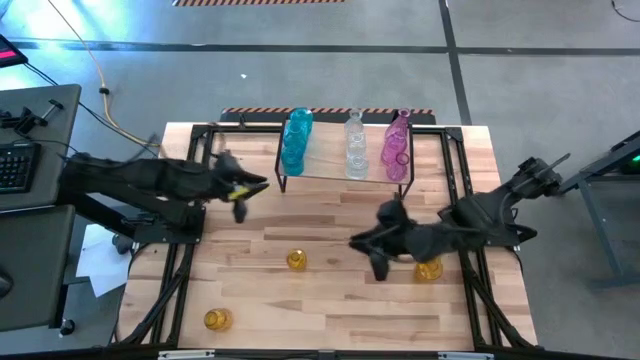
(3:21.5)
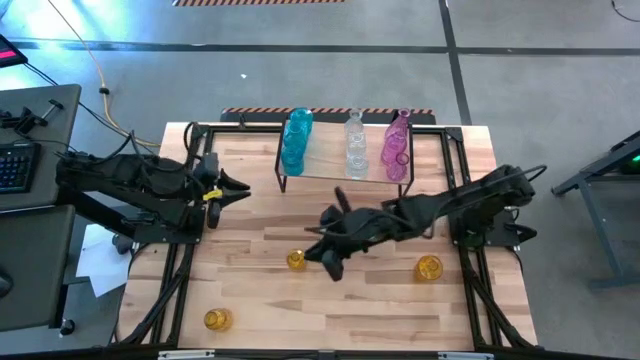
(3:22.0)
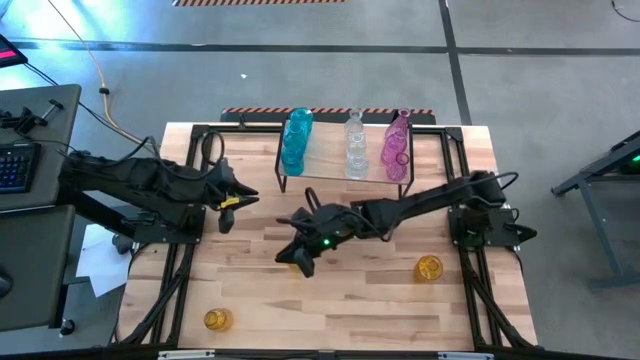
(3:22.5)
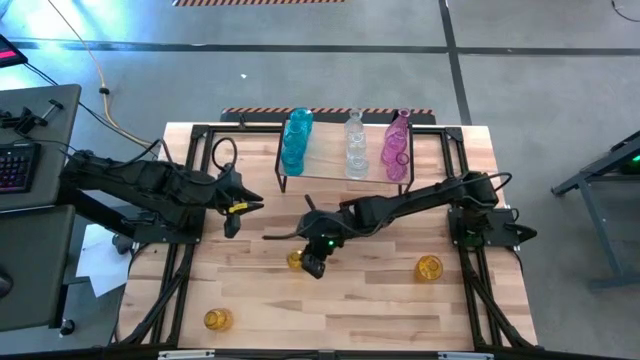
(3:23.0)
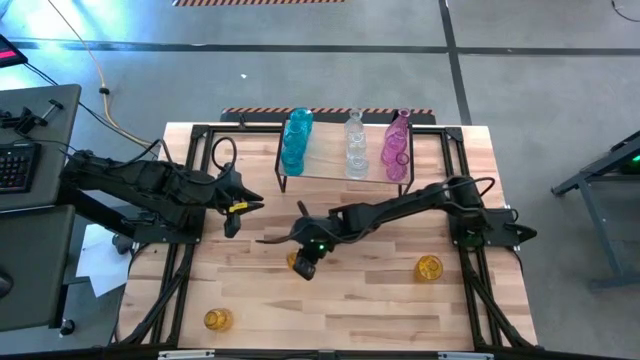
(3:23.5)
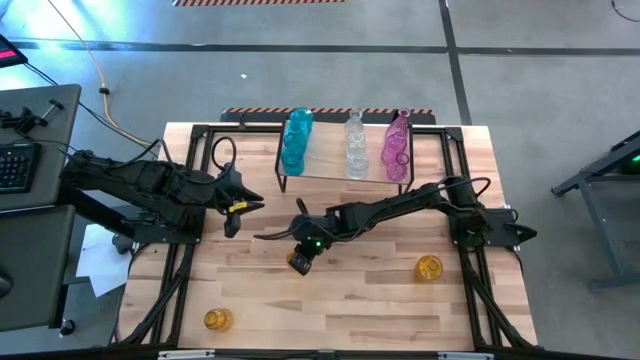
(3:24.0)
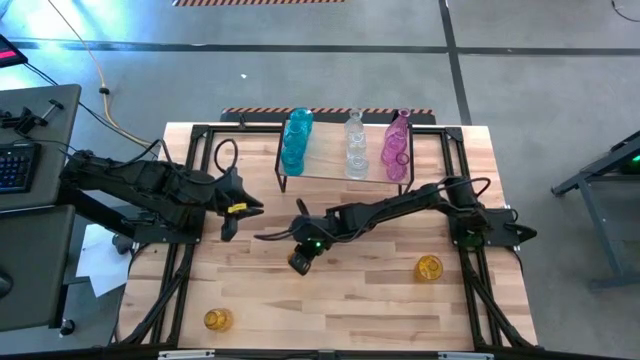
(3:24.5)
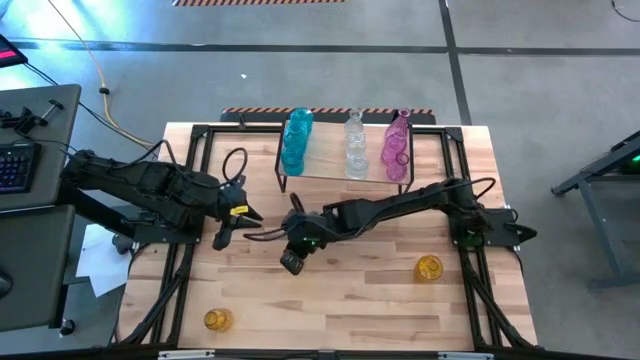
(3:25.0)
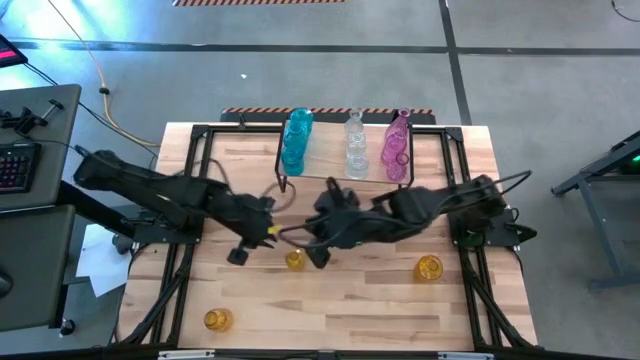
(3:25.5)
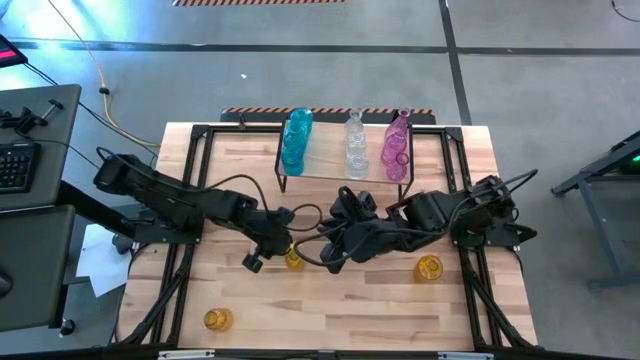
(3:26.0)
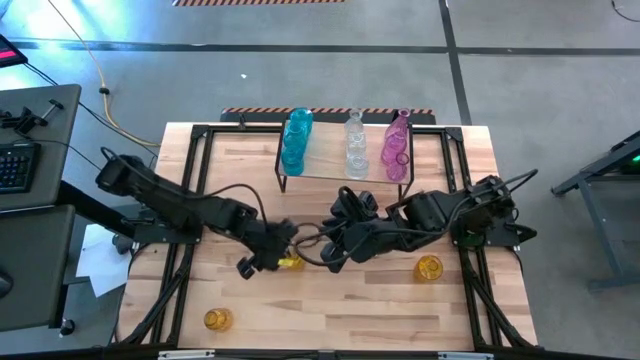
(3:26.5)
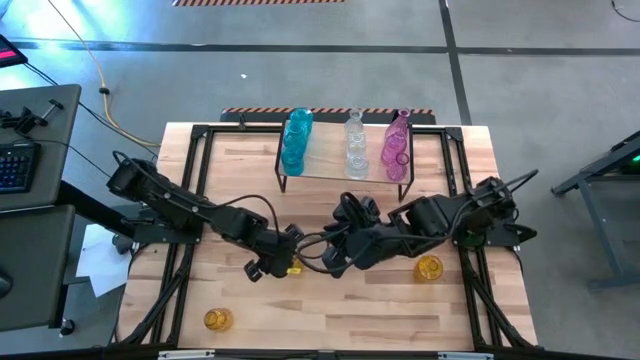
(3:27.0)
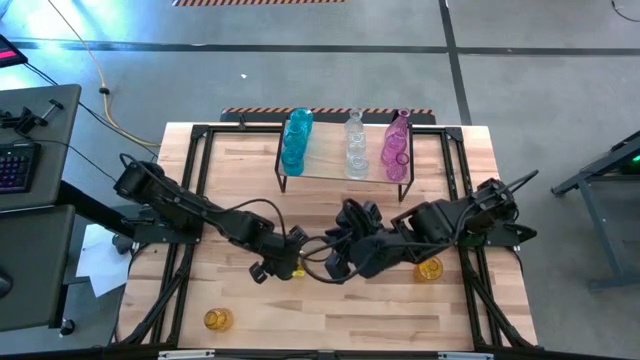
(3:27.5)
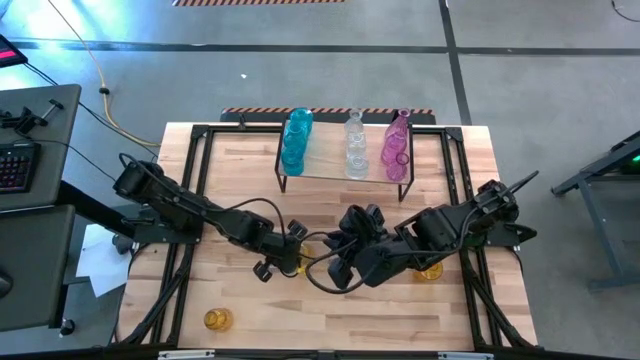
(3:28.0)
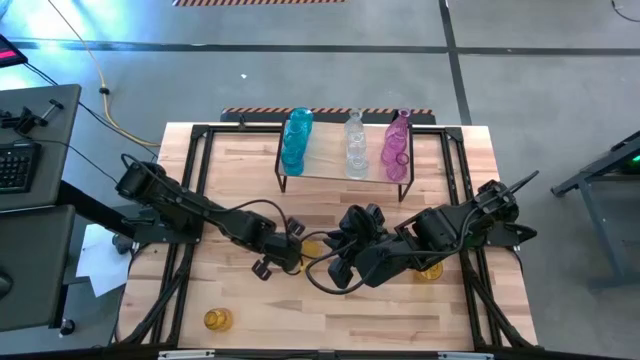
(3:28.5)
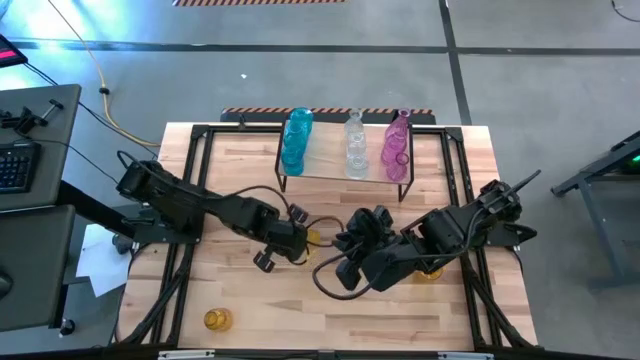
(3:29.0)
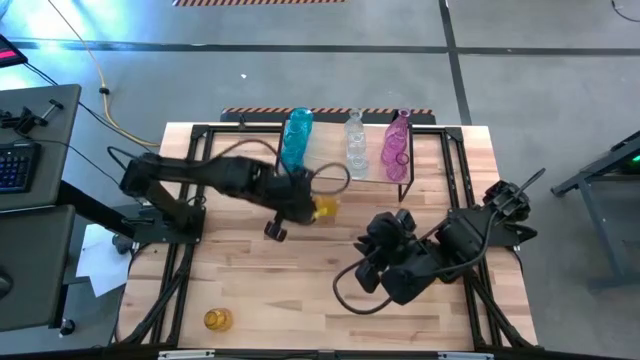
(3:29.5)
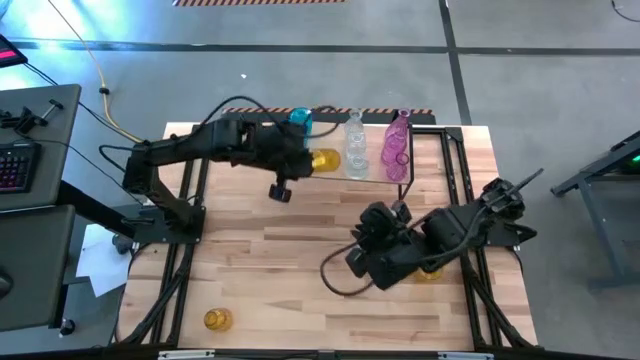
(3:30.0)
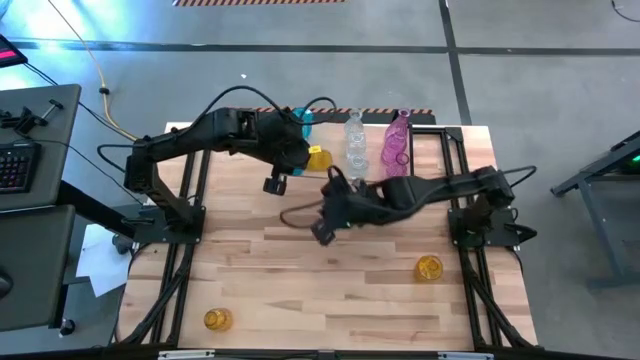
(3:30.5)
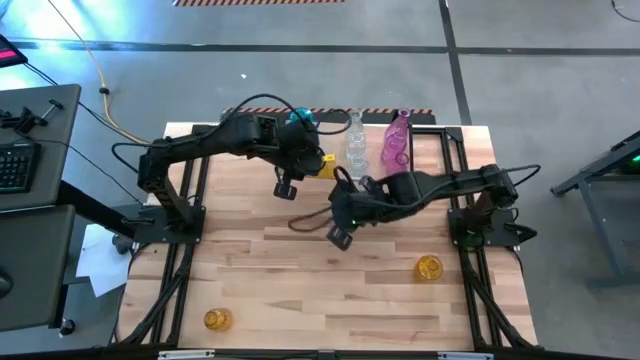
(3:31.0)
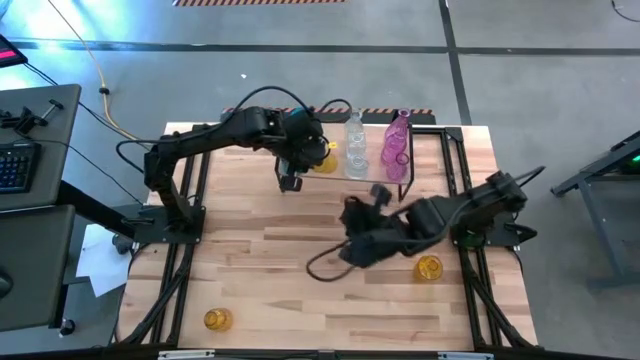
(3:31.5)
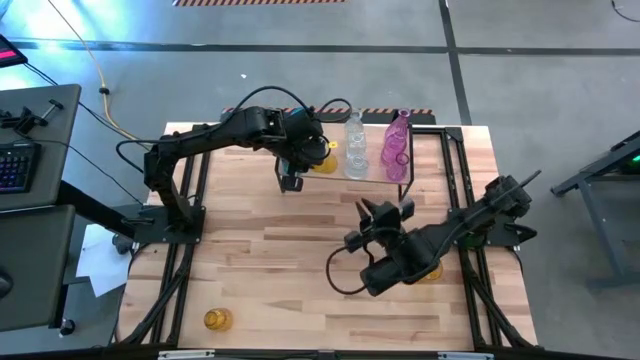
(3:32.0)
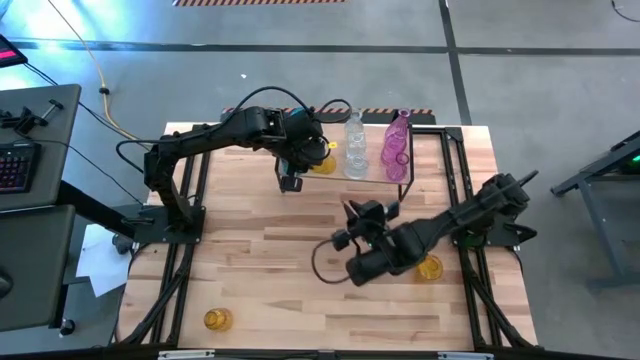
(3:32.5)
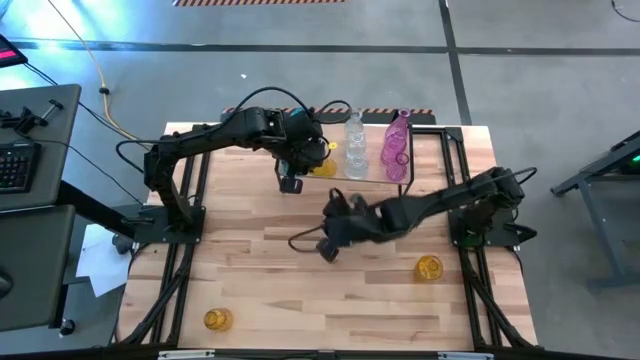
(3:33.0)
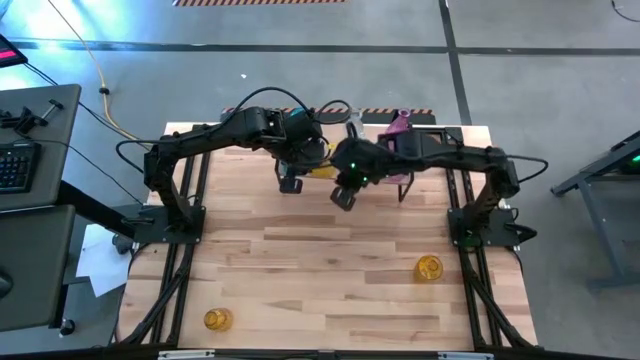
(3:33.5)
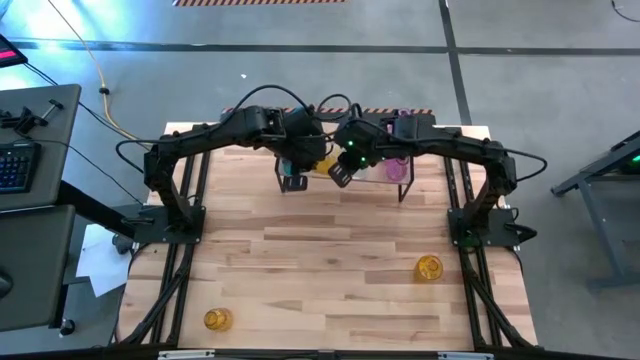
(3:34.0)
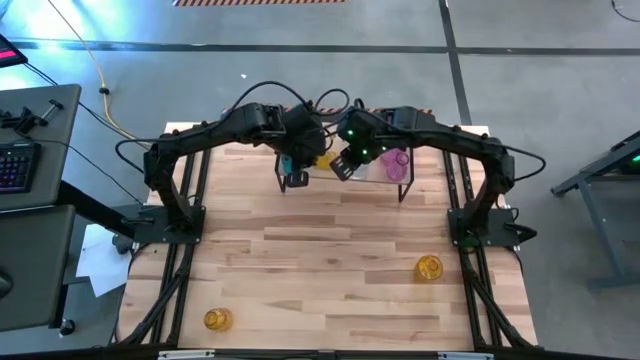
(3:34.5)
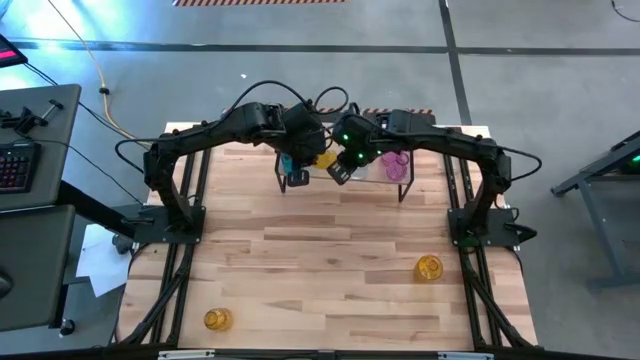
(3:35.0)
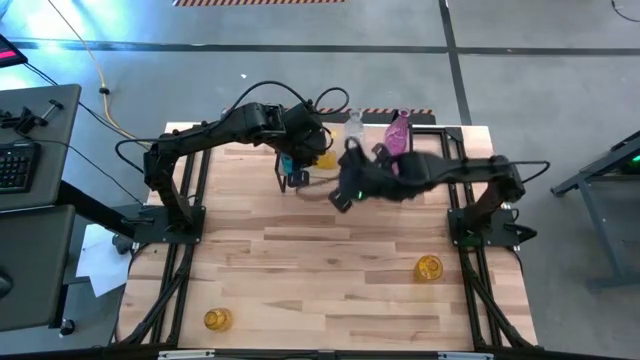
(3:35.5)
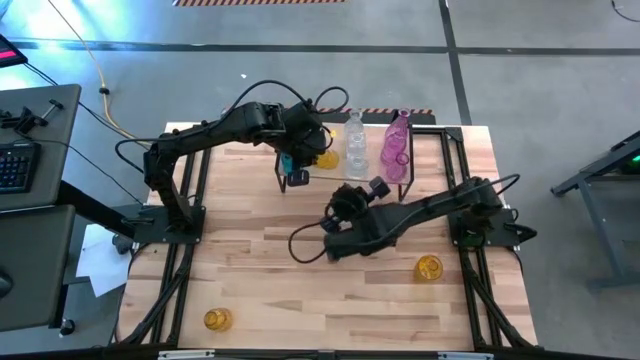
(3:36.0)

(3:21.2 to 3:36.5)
Task: sort vases onto shelf
Put the top left yellow vase on the shelf

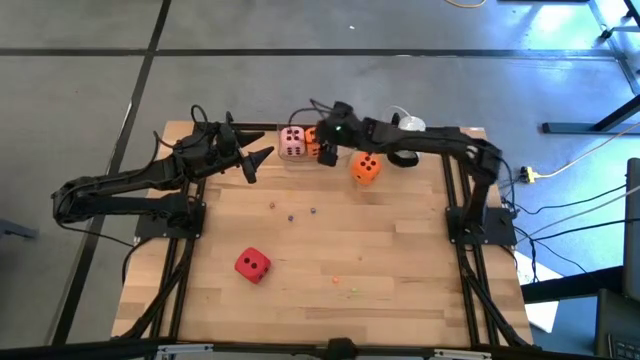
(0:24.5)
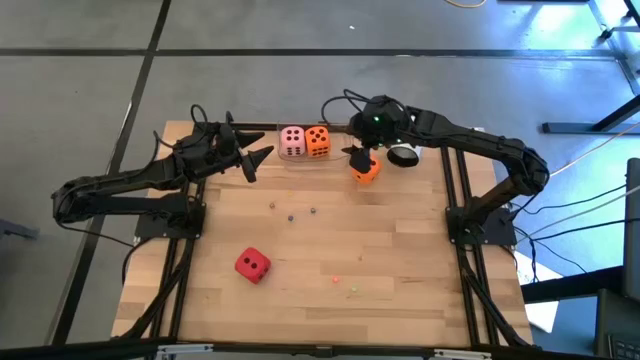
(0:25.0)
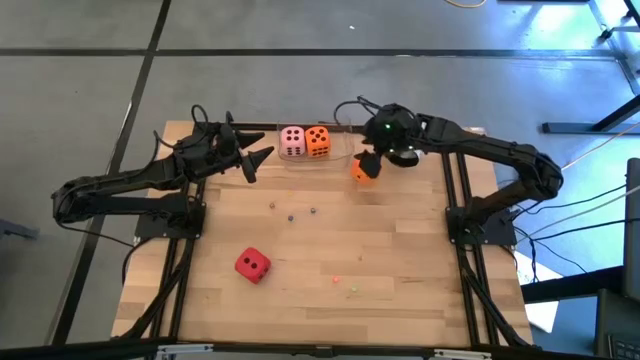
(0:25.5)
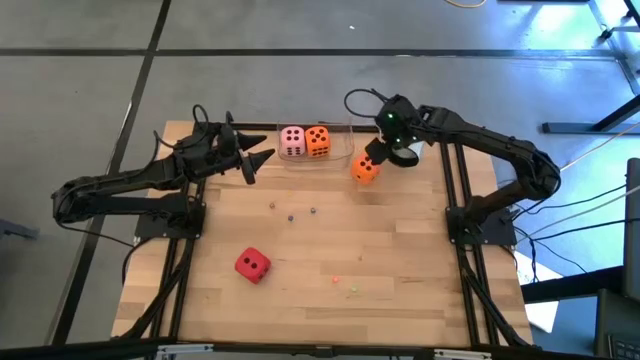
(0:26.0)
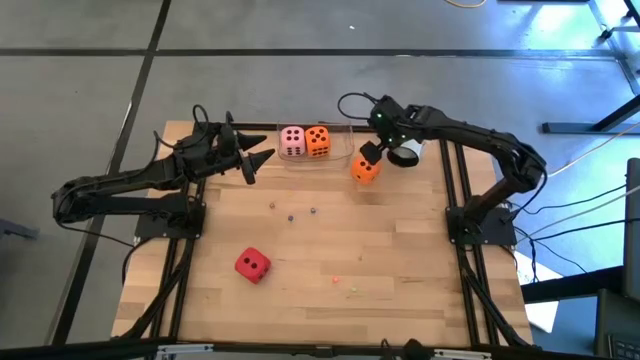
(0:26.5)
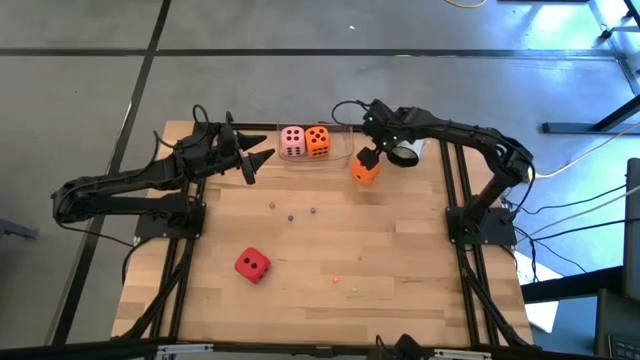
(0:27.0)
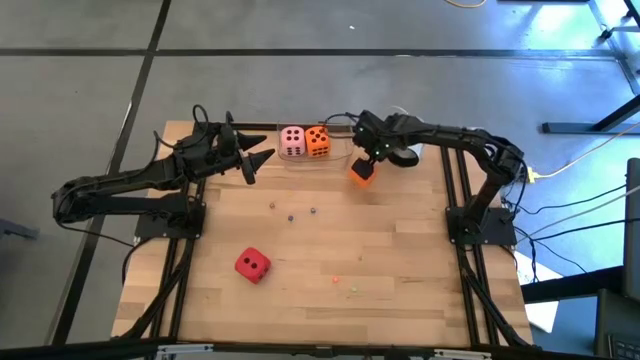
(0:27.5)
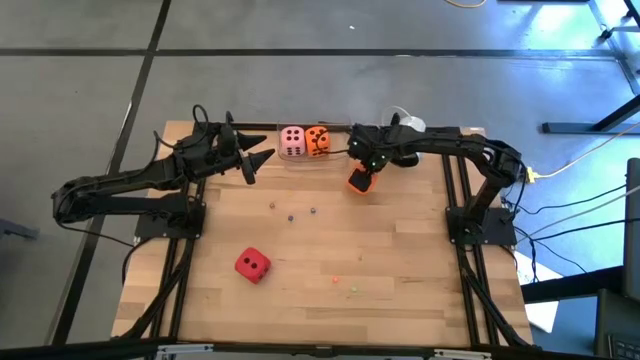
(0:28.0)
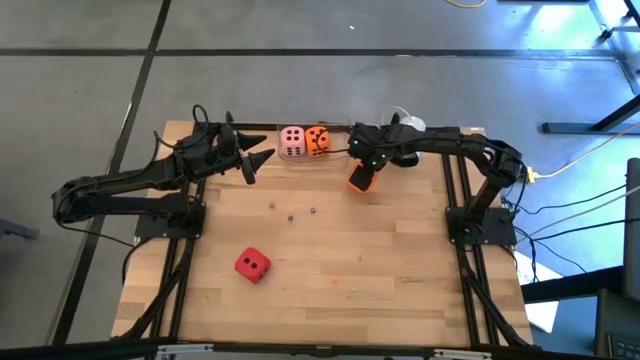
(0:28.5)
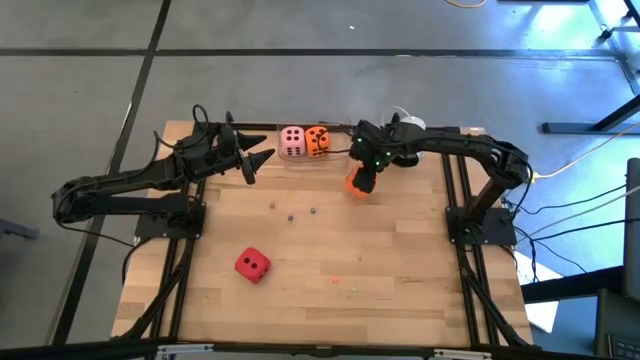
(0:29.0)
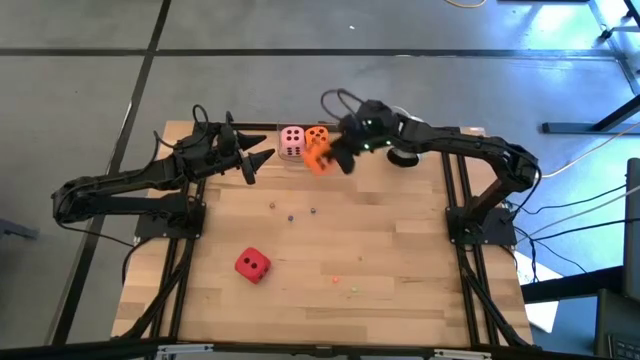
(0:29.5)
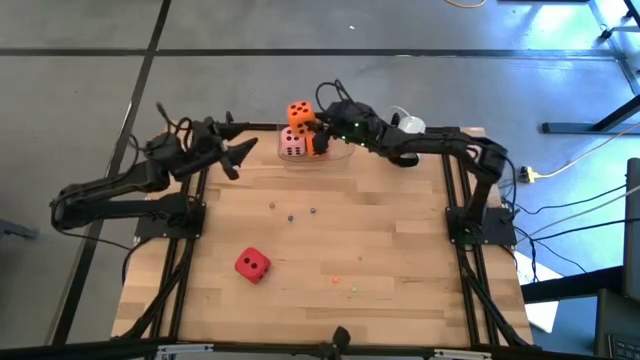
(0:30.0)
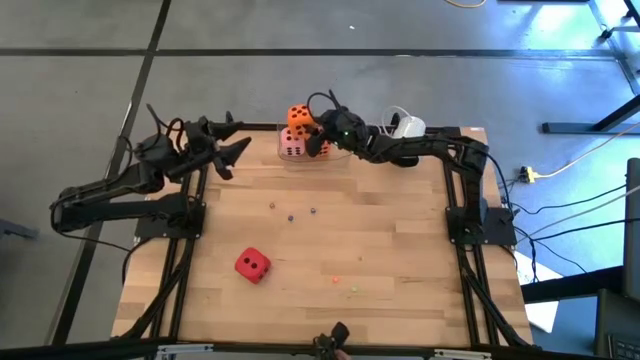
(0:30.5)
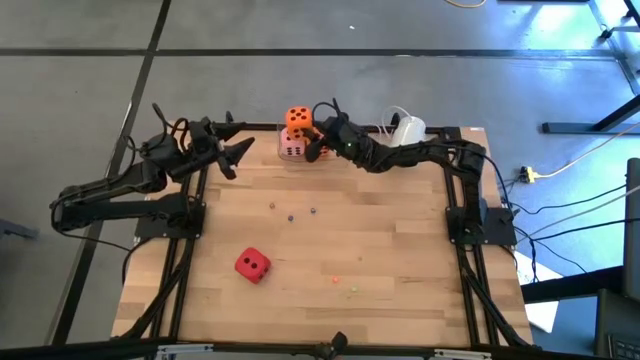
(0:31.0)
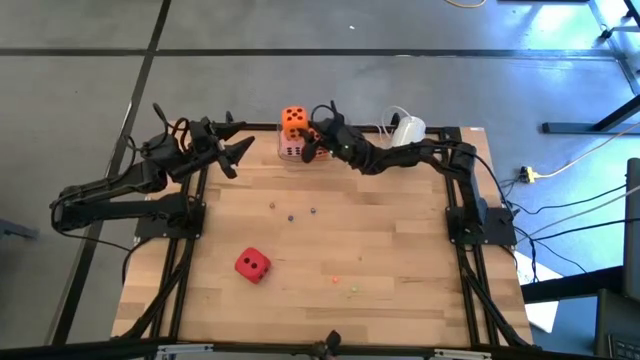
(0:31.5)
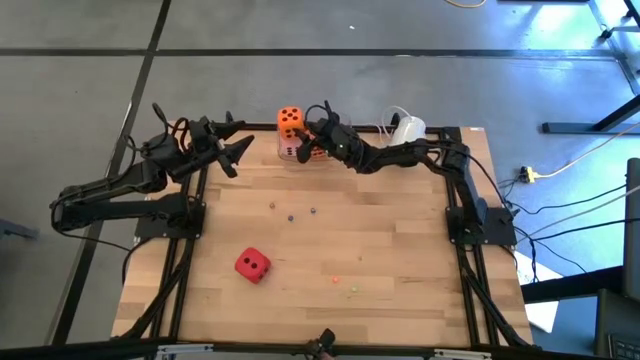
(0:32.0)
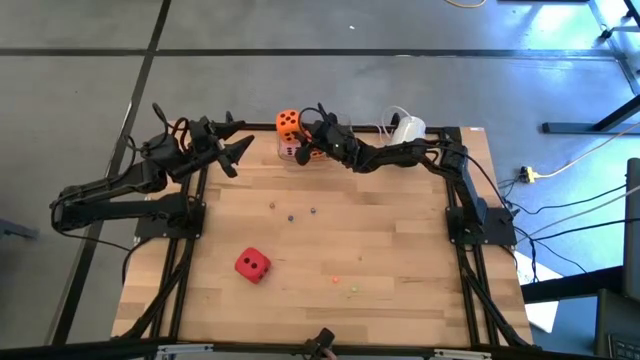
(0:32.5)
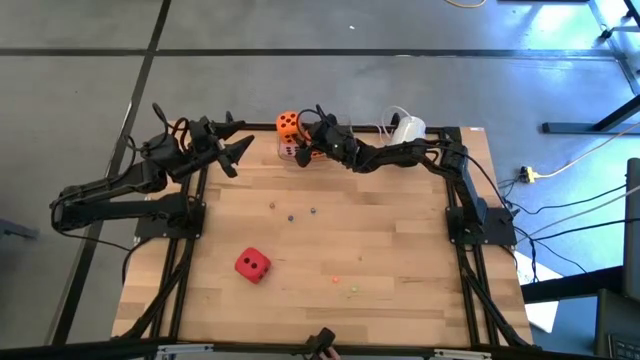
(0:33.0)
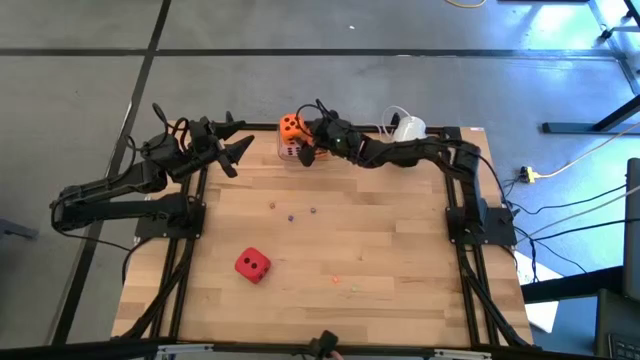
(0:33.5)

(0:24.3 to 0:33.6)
Task: Pick & Place Dice
Put the large orange dice into the transparent bin
